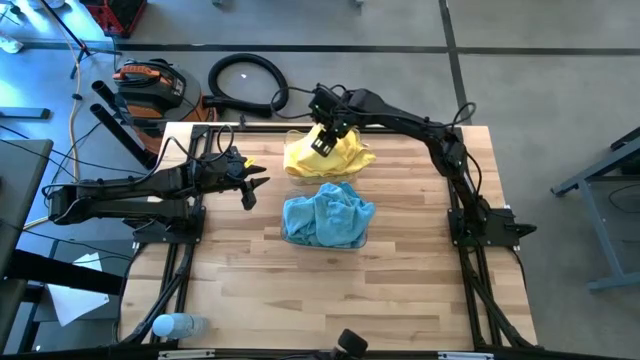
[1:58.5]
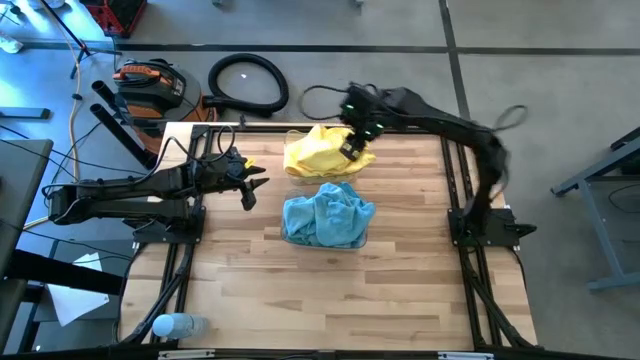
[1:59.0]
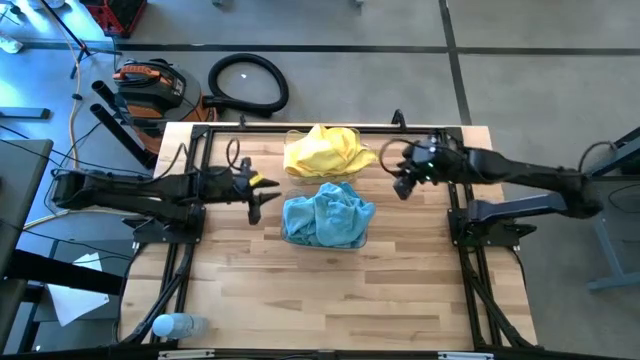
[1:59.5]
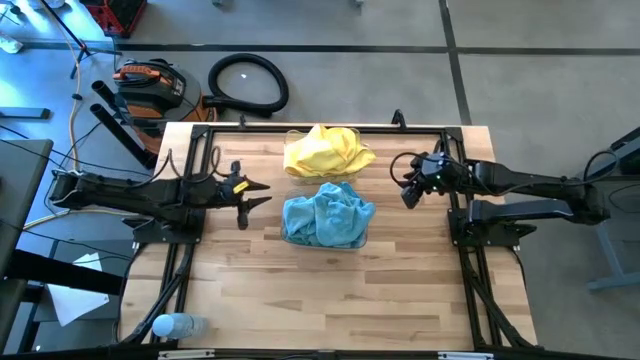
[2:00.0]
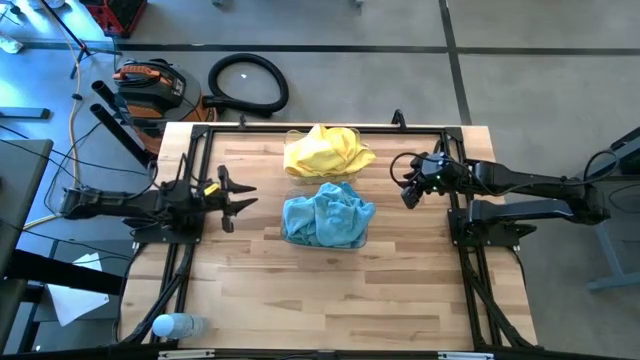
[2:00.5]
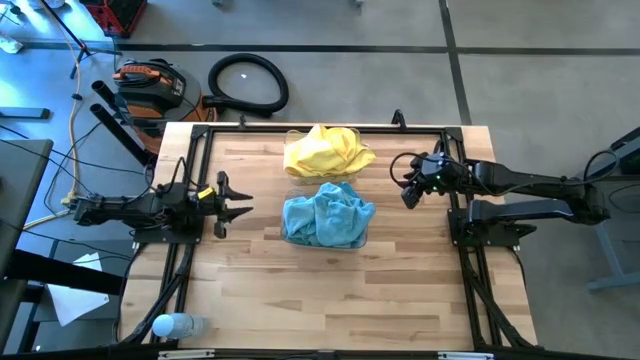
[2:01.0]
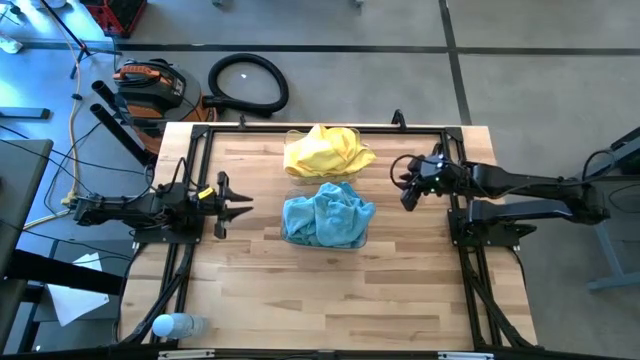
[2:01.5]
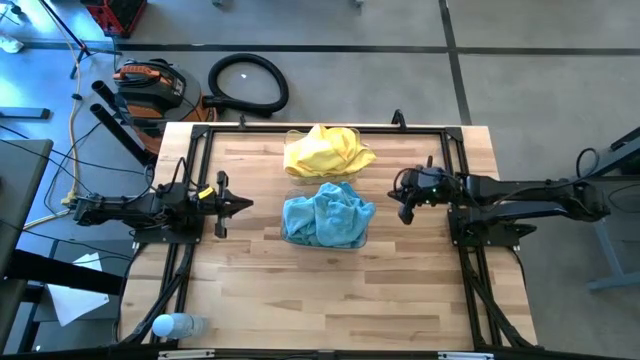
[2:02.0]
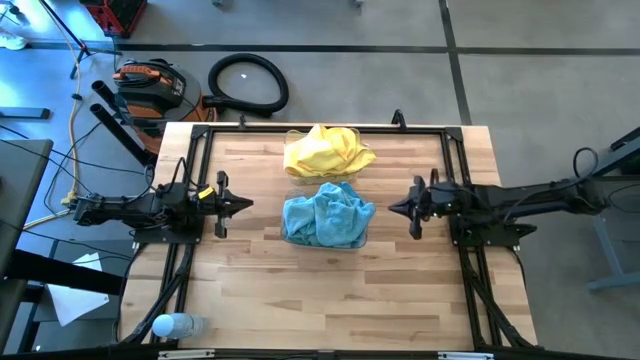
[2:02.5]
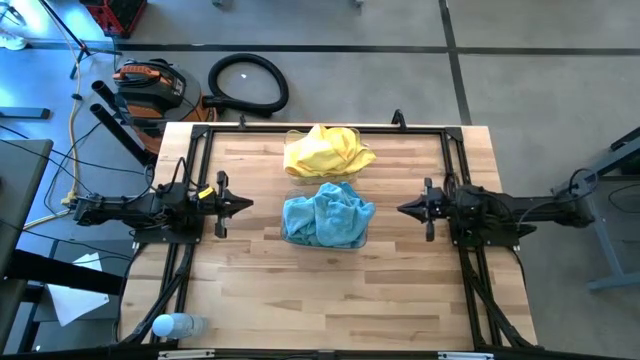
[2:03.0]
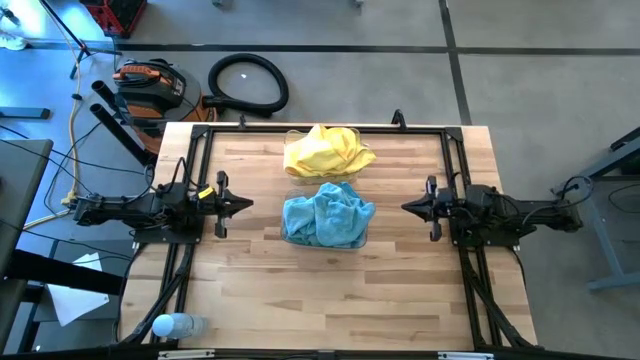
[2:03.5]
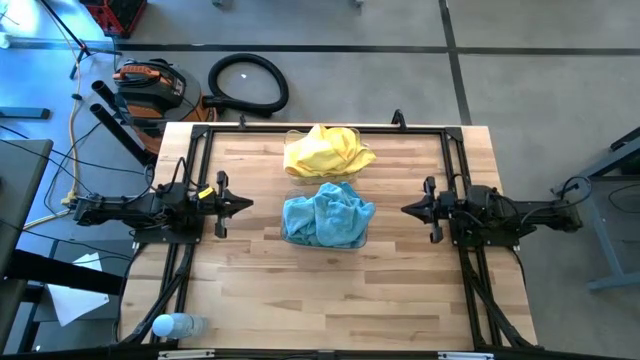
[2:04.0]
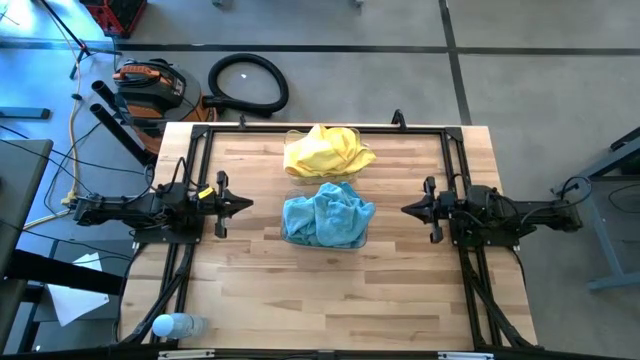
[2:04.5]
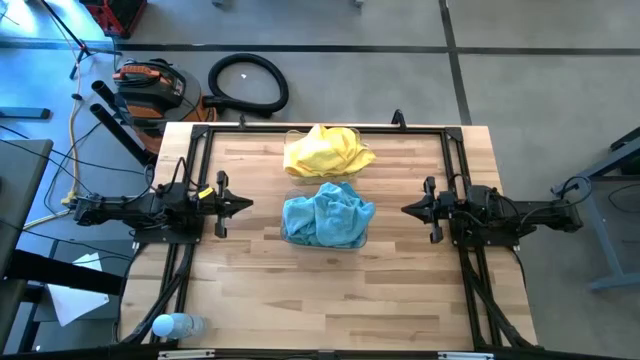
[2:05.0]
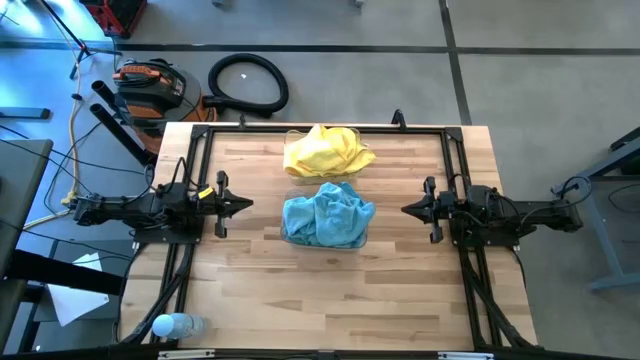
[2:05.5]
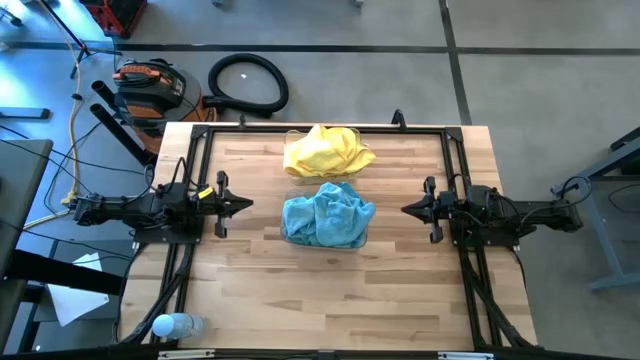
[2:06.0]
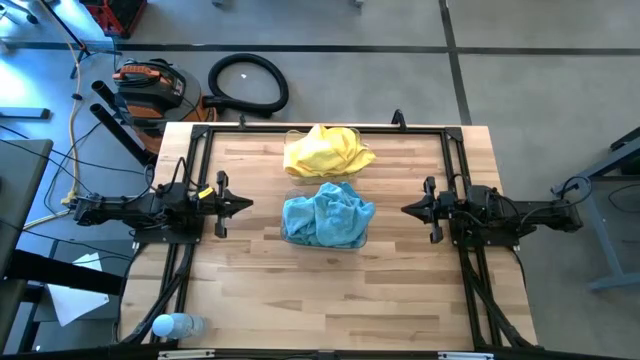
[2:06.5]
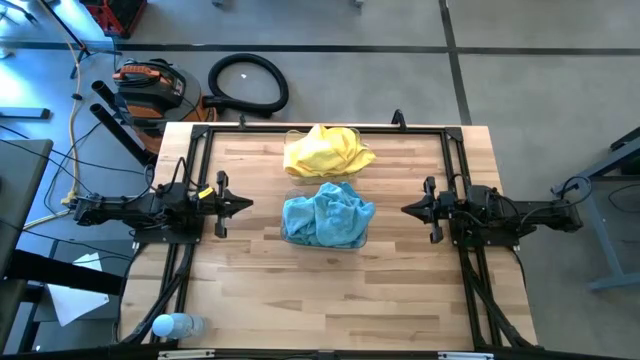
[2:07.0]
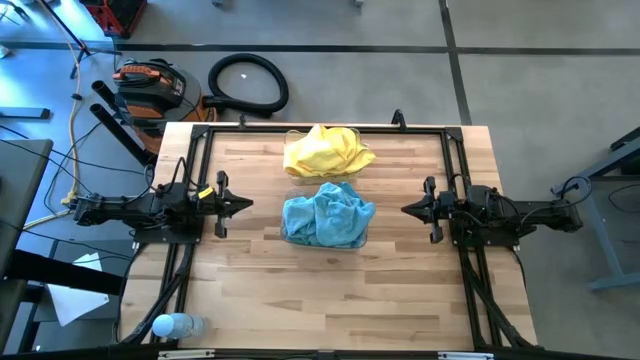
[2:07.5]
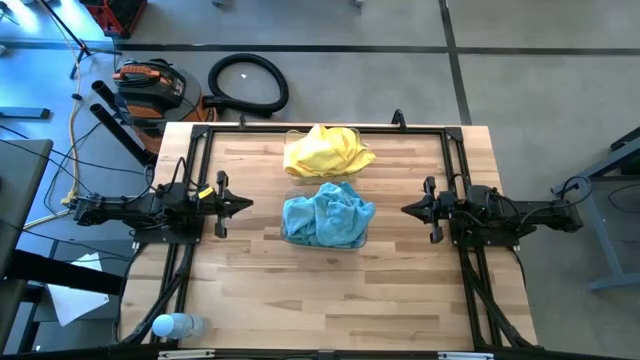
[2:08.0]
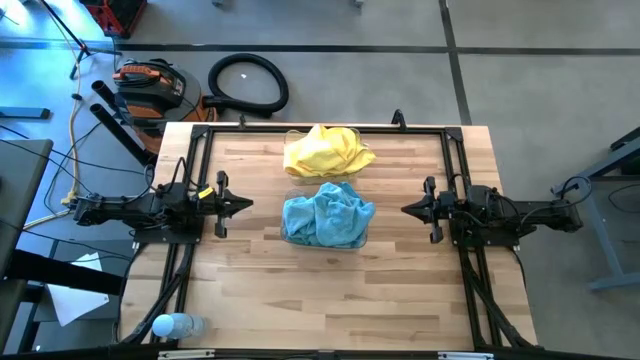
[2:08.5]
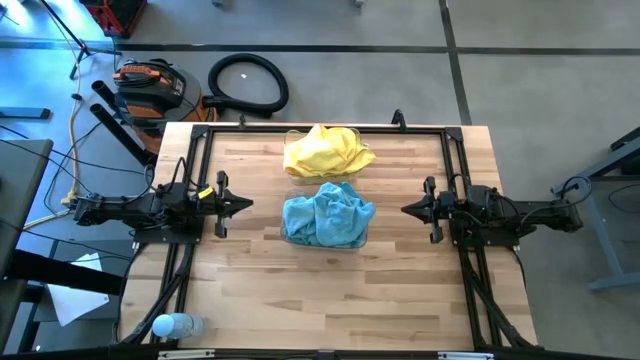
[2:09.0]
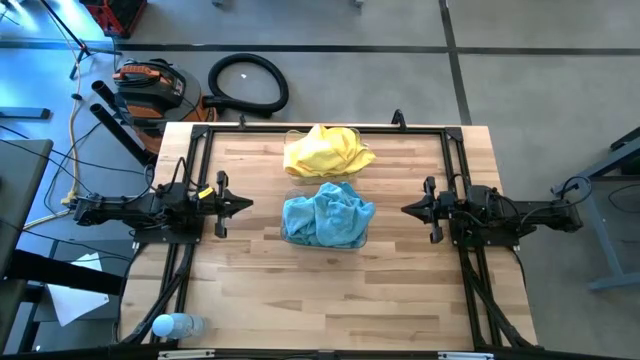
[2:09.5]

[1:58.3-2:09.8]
Task: Sort microfiber towel by color & place in baskets
Return to Home Position

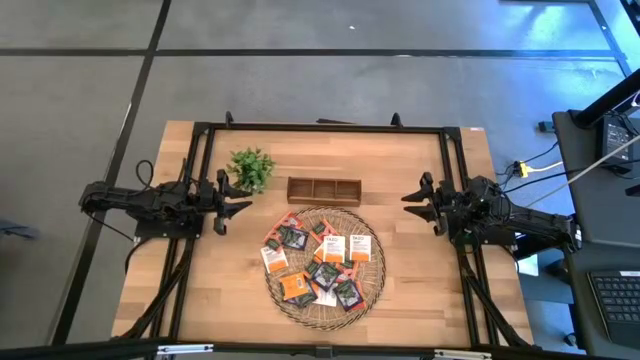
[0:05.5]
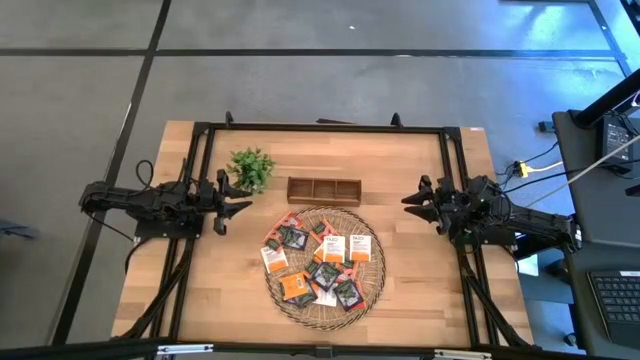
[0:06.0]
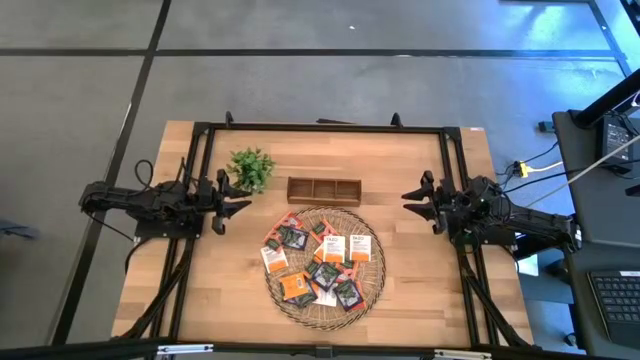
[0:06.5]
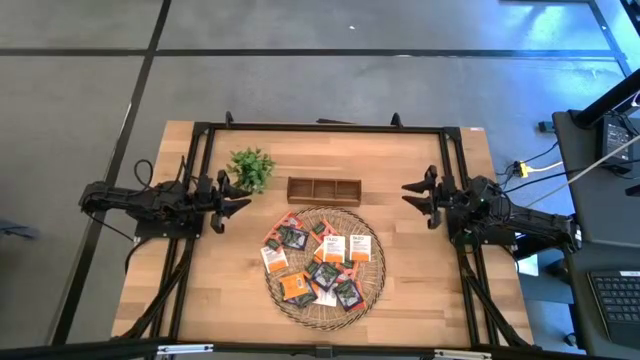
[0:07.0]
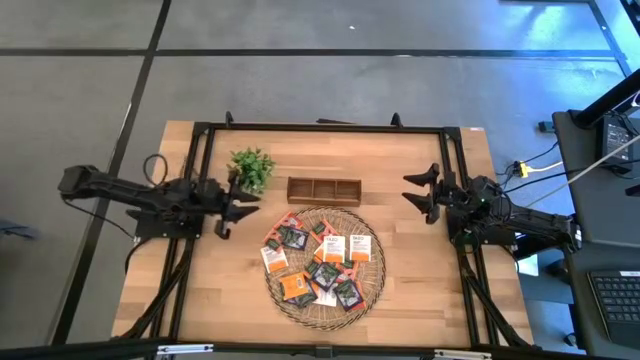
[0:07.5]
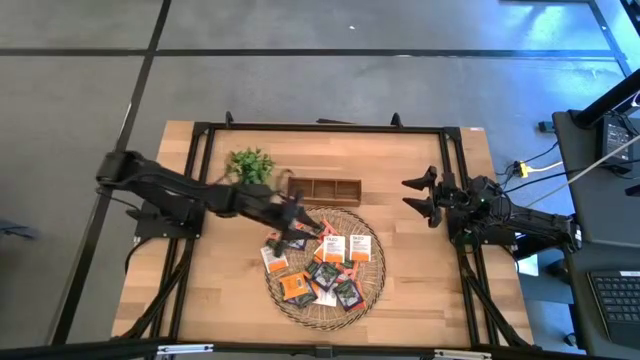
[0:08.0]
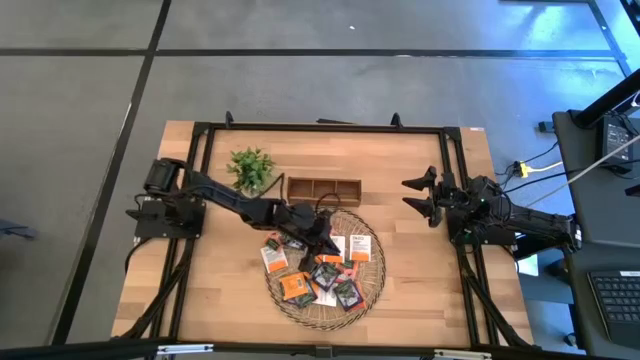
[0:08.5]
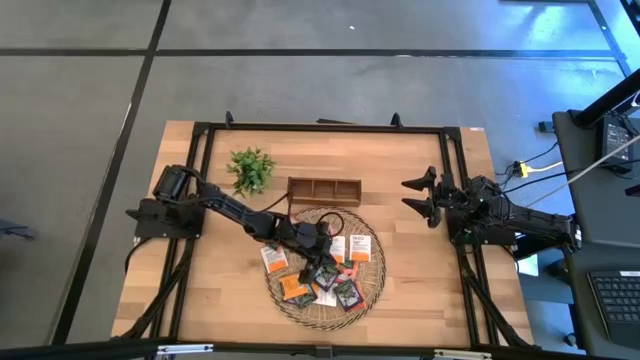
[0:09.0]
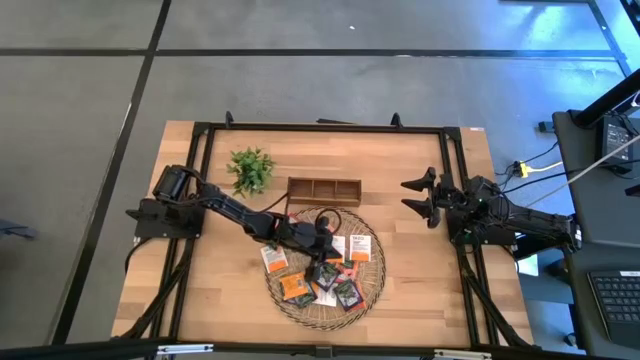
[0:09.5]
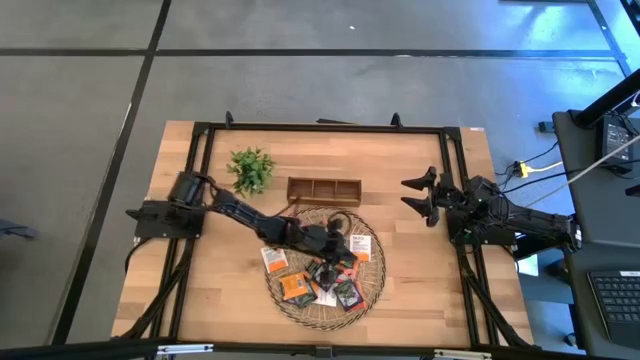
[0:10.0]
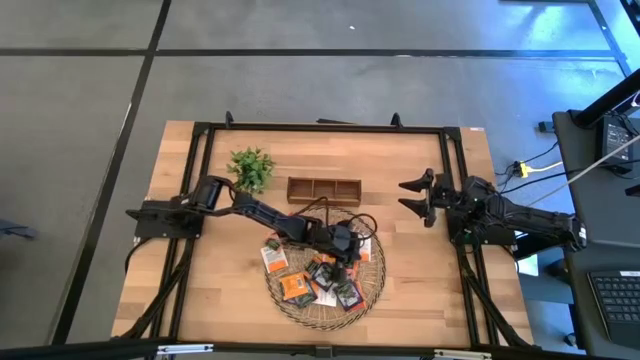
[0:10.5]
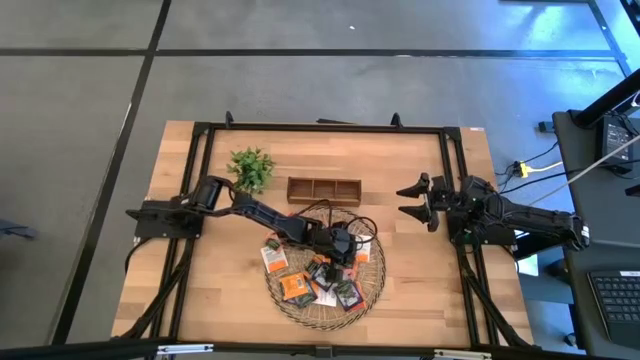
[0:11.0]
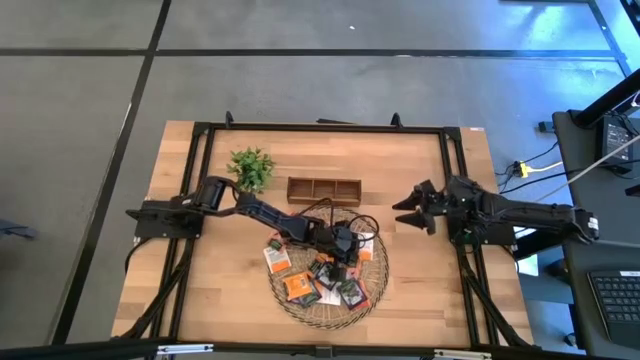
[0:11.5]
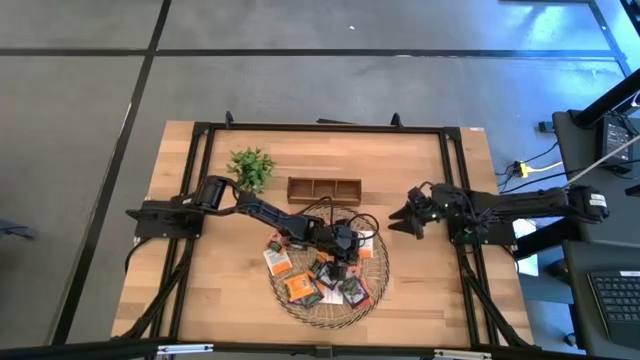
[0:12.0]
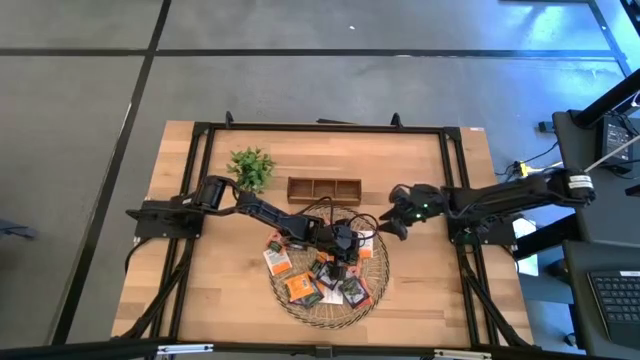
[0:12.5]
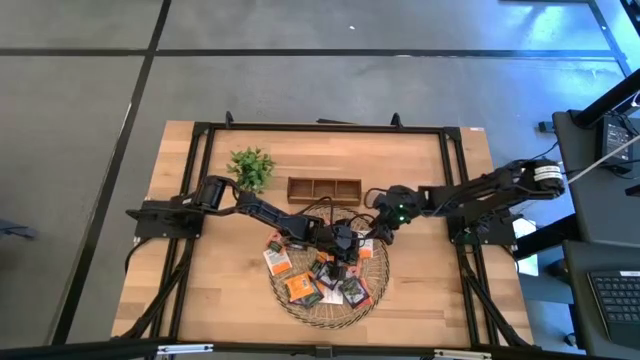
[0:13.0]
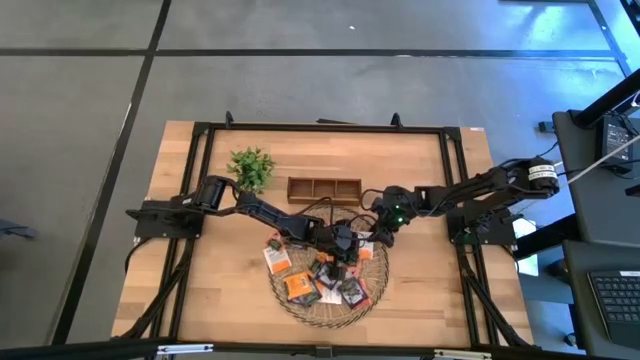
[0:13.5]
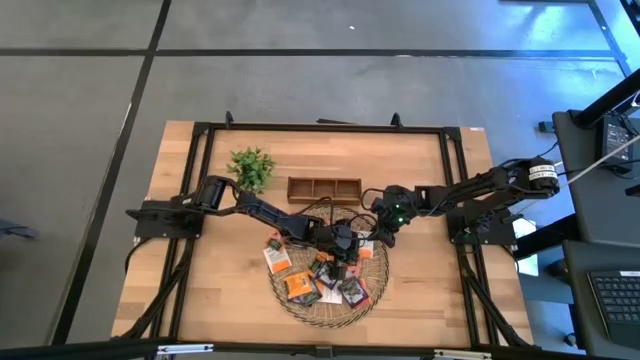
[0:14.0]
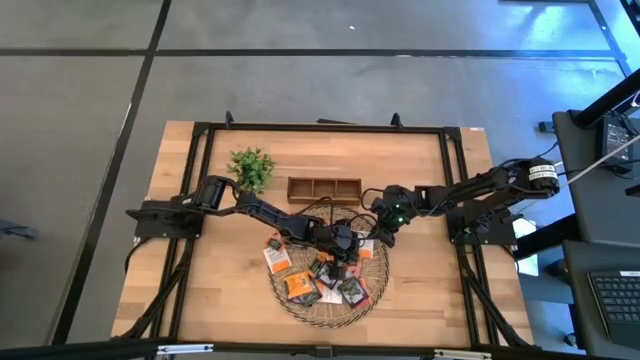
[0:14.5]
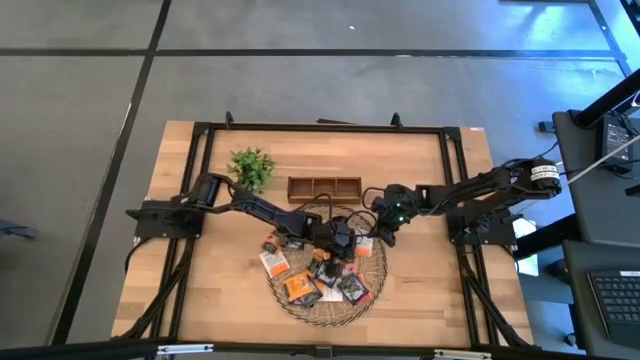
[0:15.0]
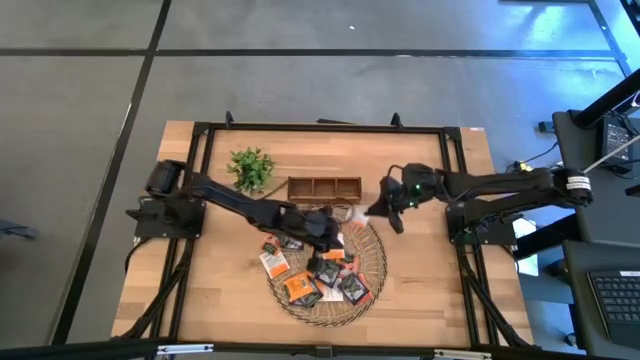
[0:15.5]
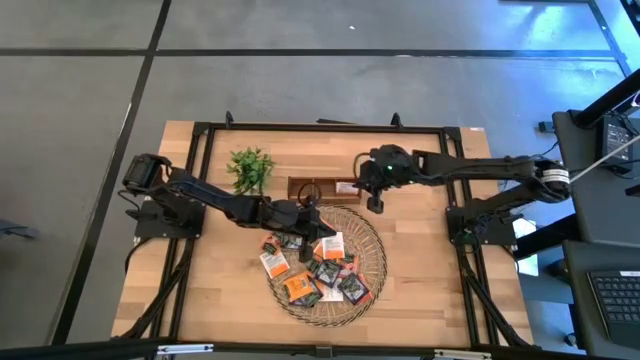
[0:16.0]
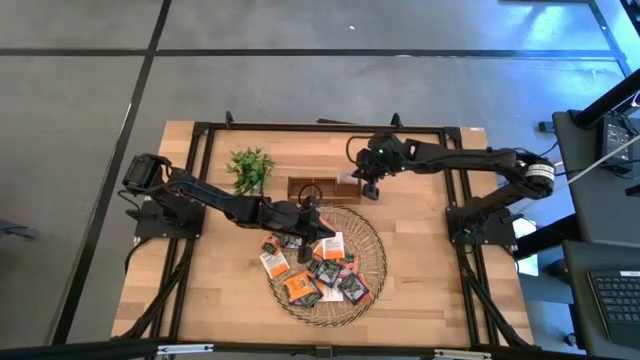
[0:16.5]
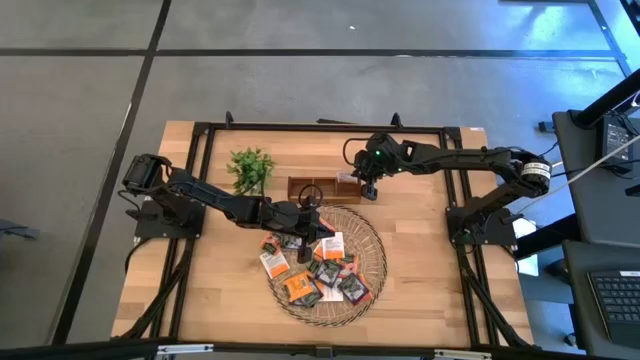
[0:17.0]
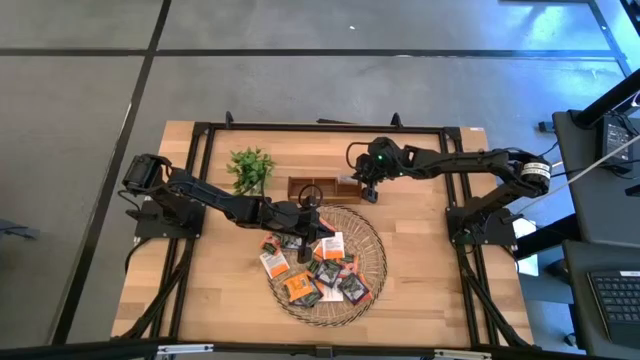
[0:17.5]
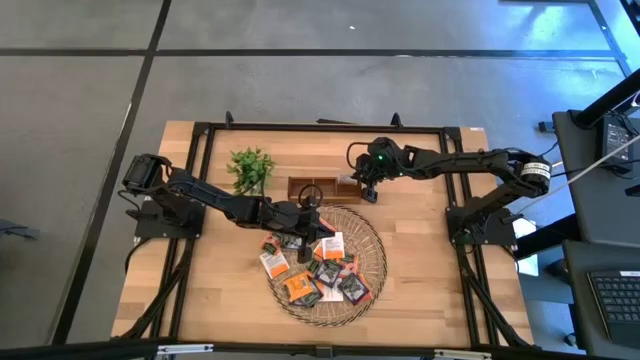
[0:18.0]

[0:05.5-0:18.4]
Task: Pick & Place Tea
Put the white and orange tea bag into the right section of the wooden organizer
